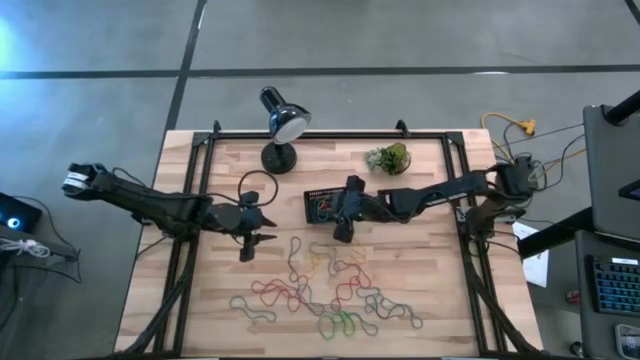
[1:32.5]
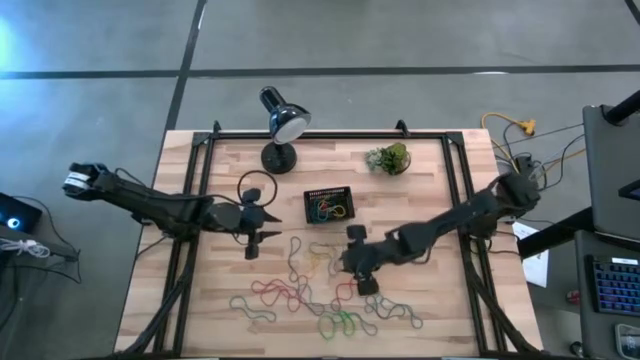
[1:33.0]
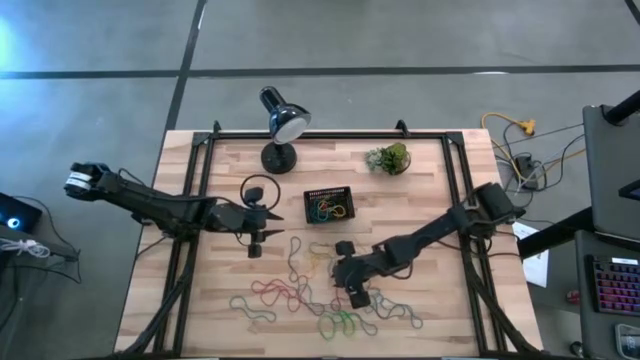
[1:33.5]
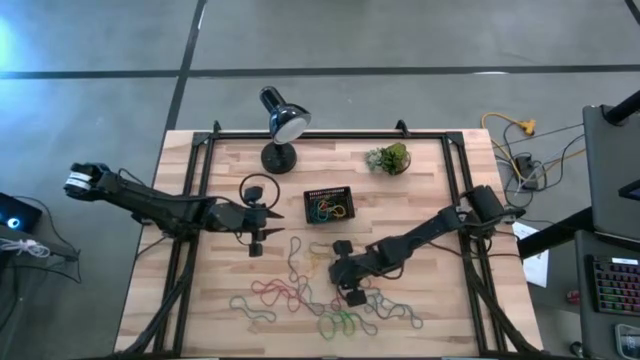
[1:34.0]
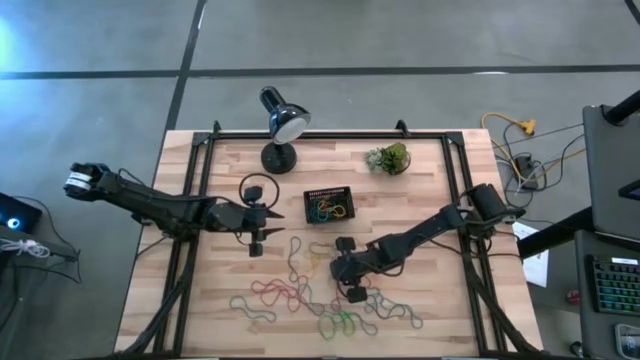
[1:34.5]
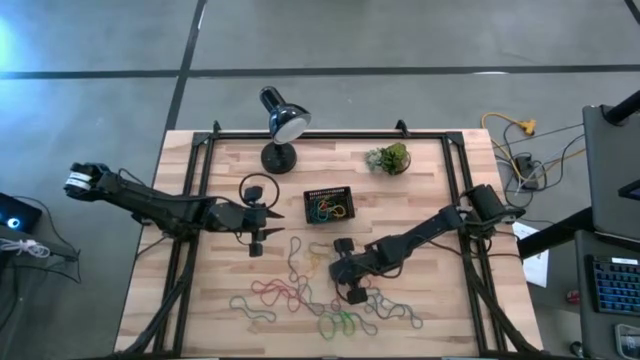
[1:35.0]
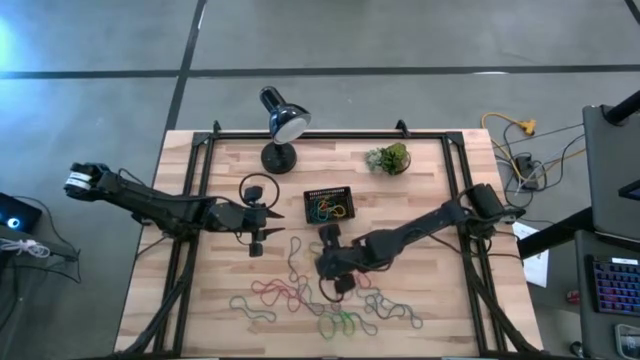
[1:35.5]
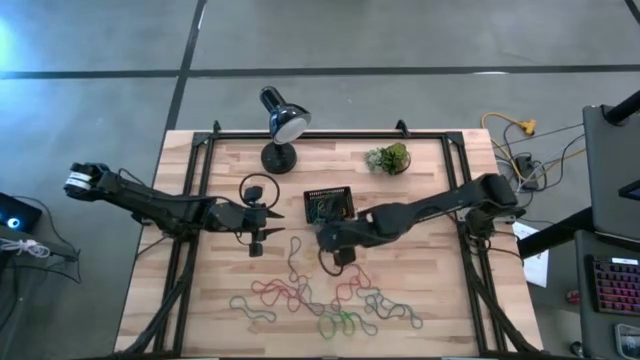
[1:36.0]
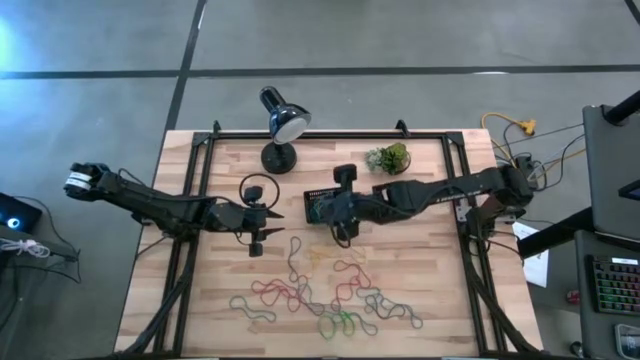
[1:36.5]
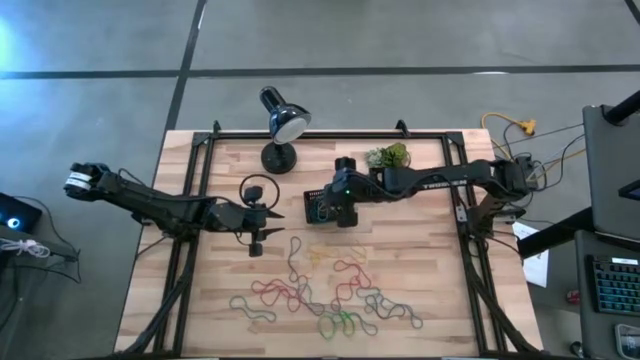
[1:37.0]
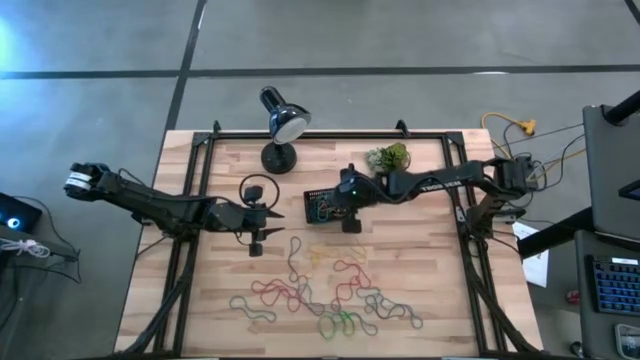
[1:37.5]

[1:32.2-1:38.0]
Task: Pick and place rubber bands into bin
Put the blue rubber band into the black bin

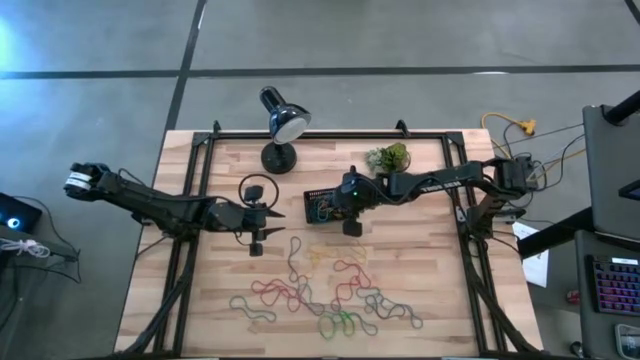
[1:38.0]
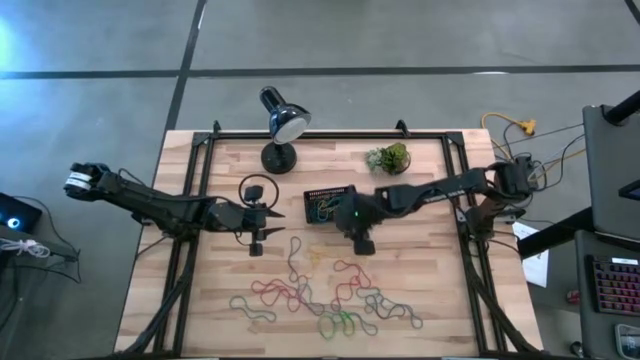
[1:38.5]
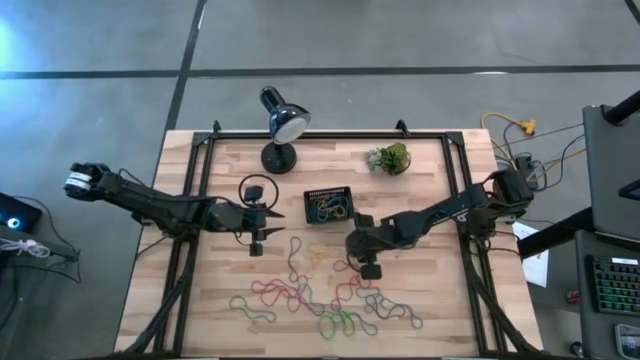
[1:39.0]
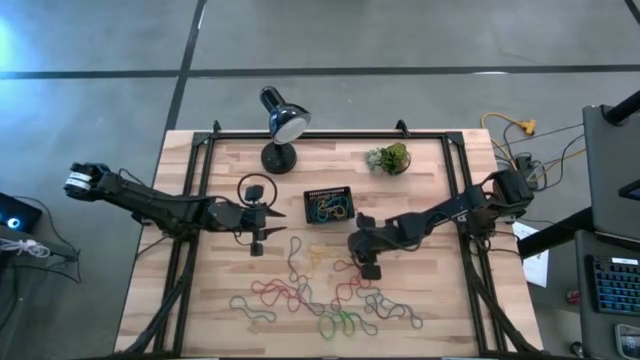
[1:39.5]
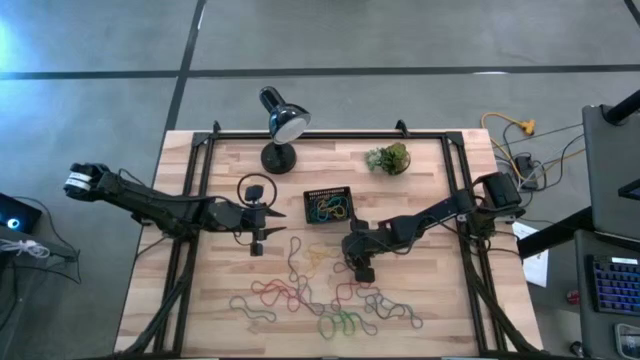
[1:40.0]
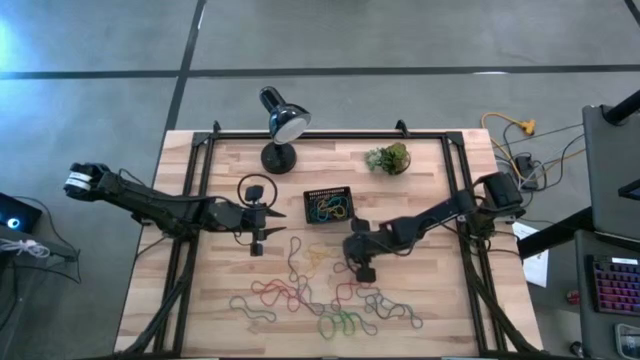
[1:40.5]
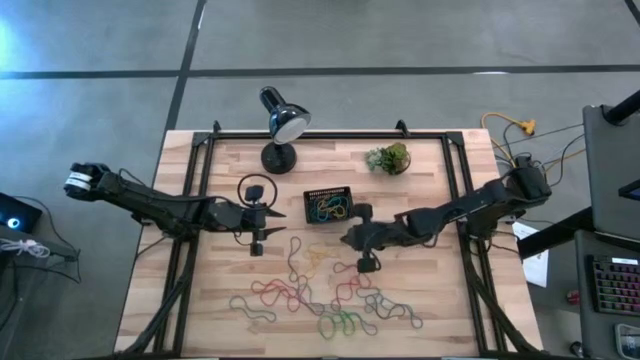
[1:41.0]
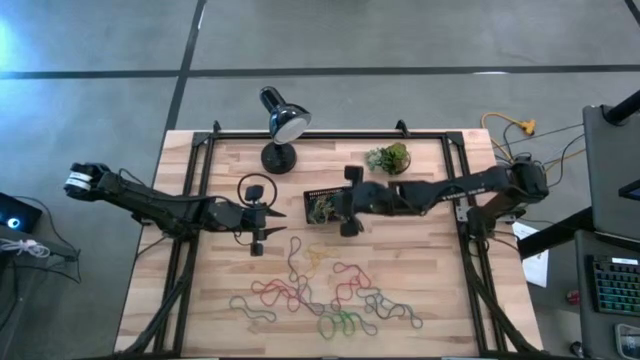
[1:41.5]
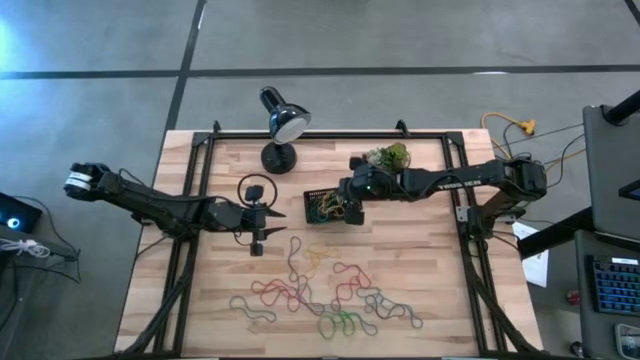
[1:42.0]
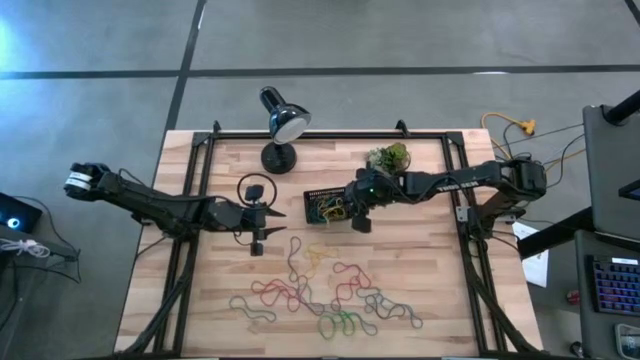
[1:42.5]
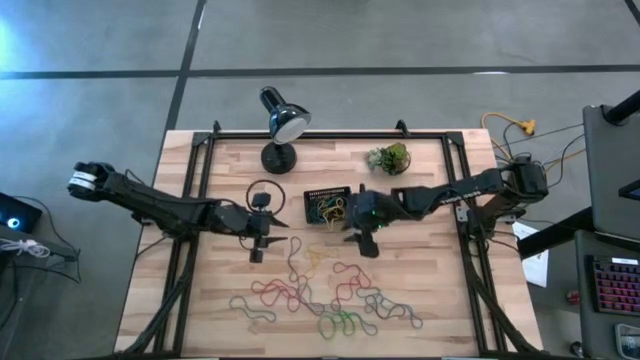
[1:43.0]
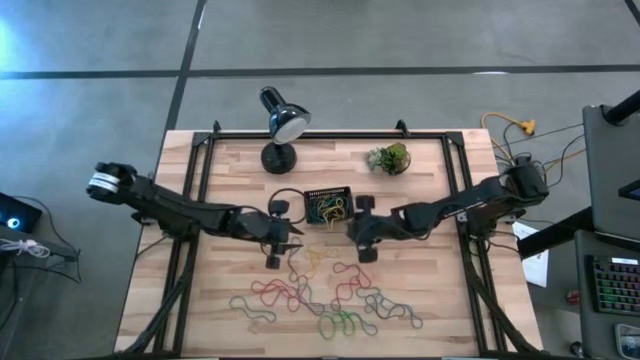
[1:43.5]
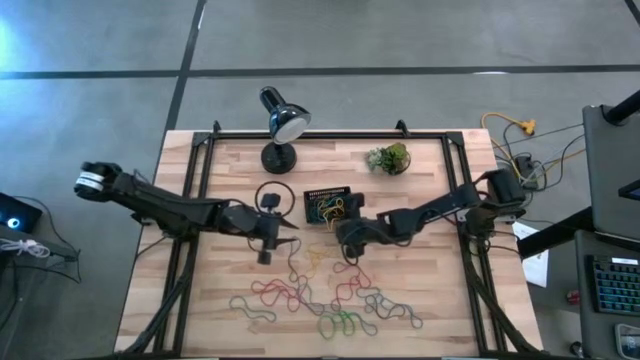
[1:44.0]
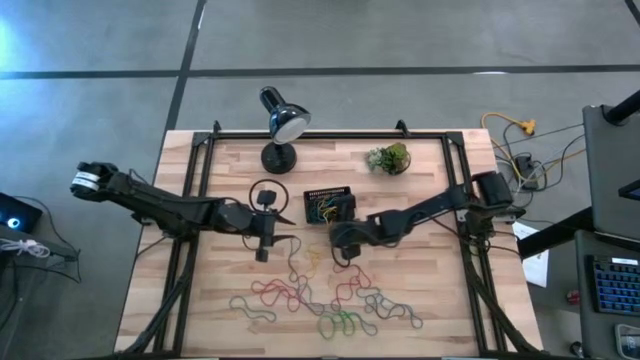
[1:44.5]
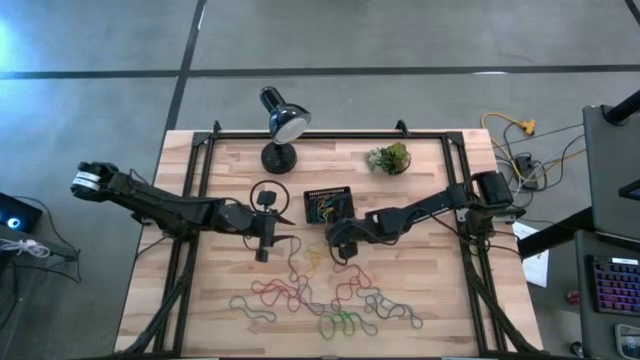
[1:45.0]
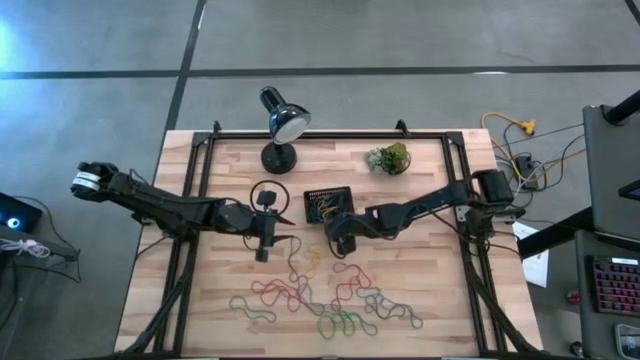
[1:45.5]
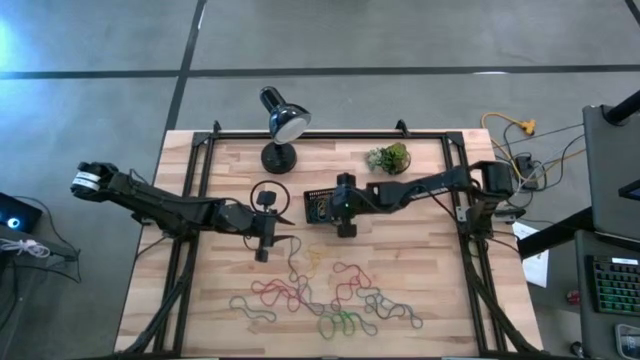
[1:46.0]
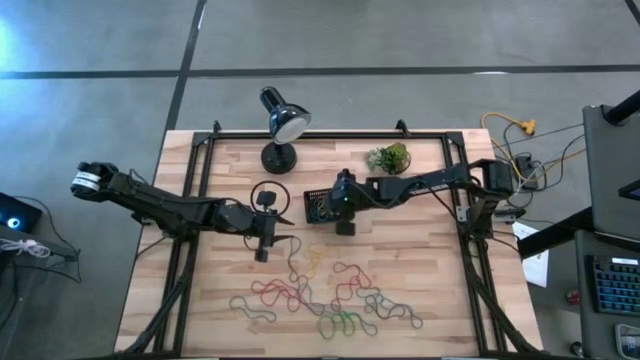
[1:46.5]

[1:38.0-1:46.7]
Put the yellow rubber band into the black bin

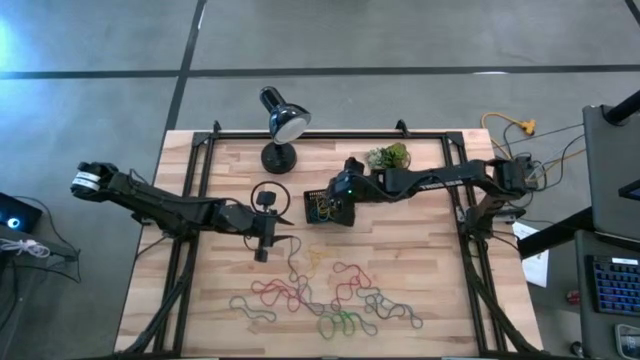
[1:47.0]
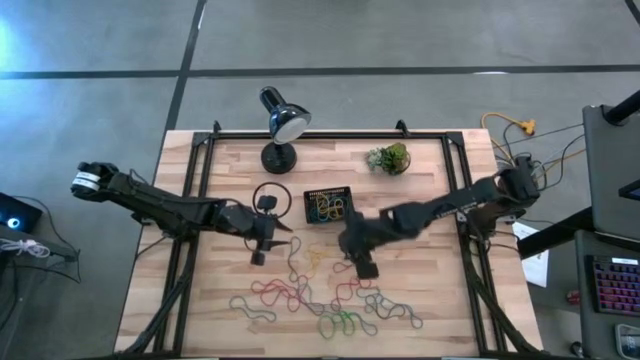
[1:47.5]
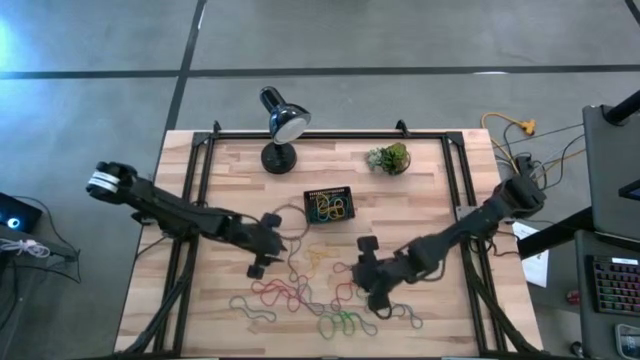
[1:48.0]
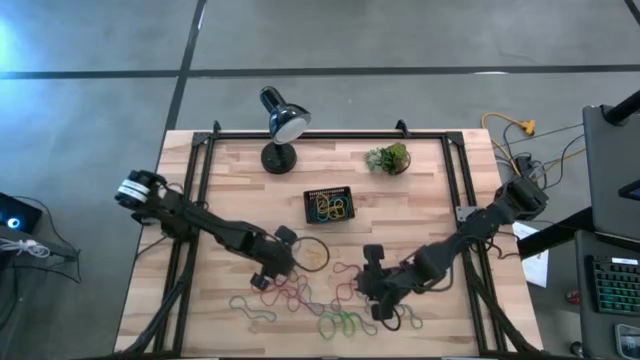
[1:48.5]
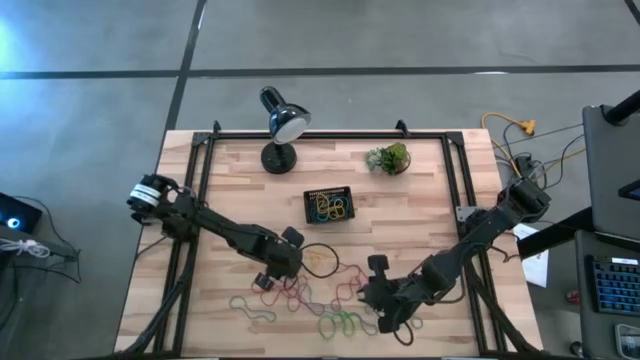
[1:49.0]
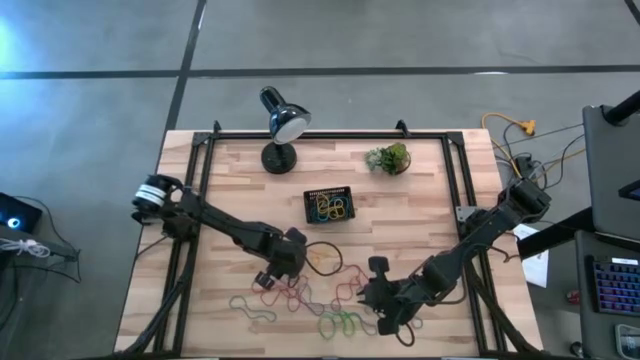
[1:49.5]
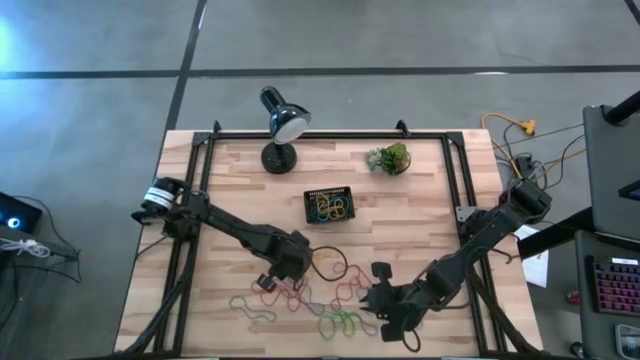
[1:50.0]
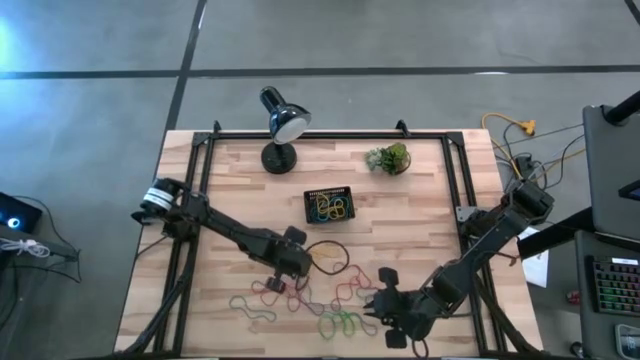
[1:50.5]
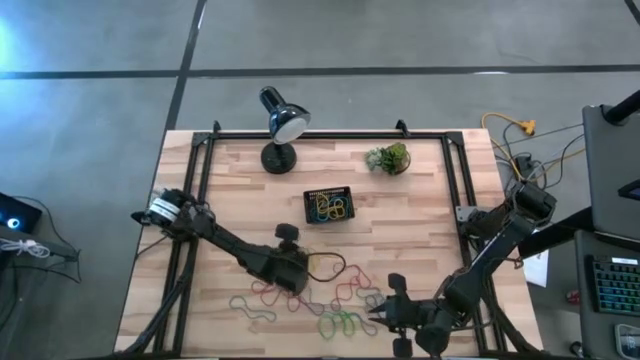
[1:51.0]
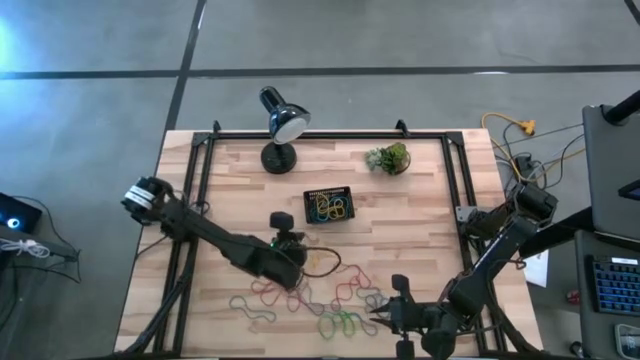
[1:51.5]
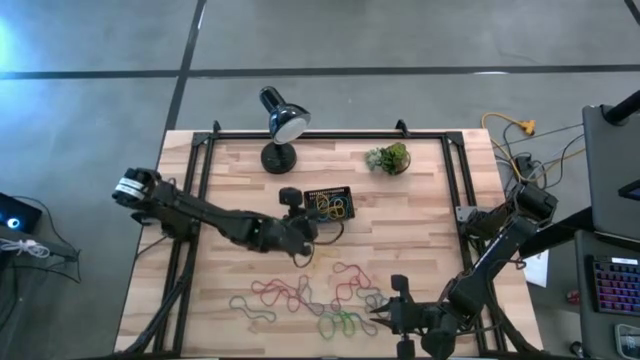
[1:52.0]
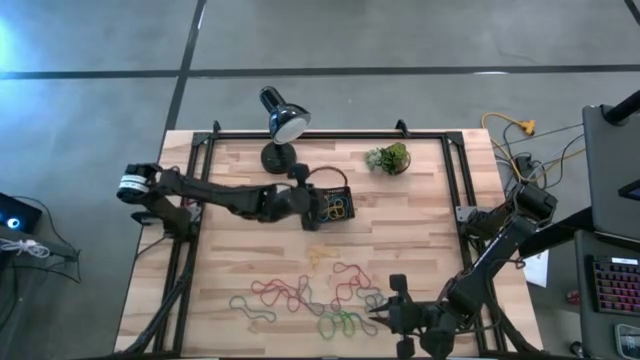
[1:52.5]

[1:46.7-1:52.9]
Put the purple rubber band into the black bin

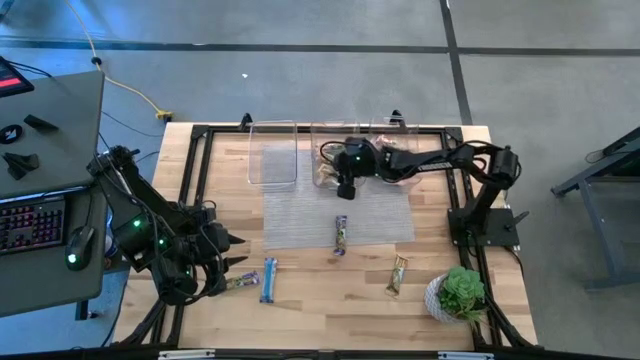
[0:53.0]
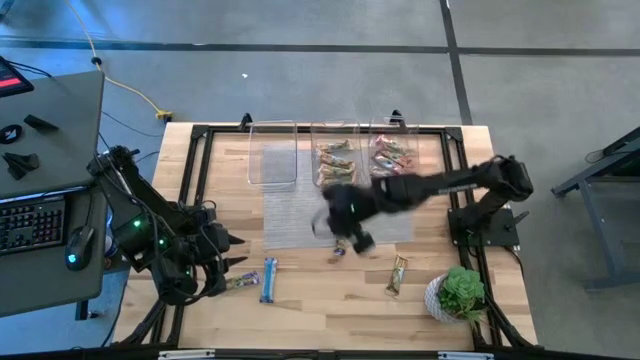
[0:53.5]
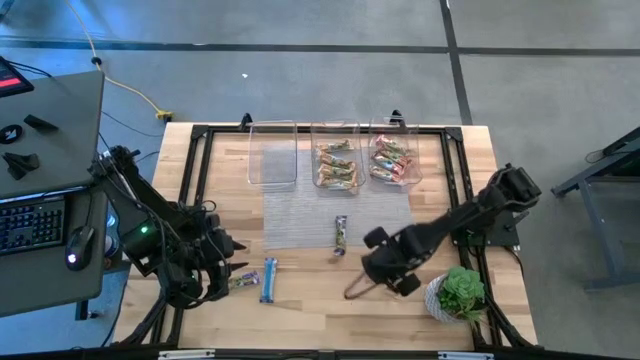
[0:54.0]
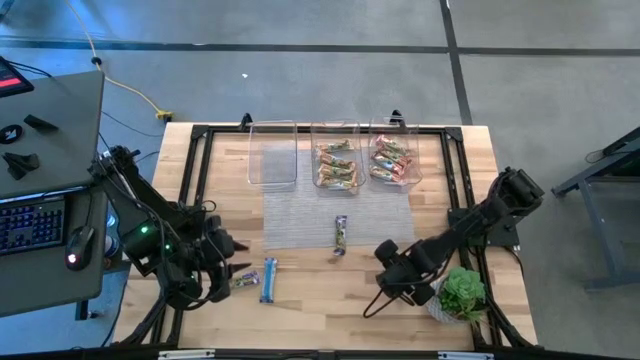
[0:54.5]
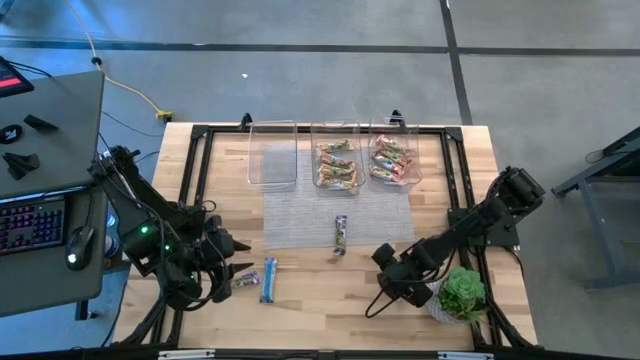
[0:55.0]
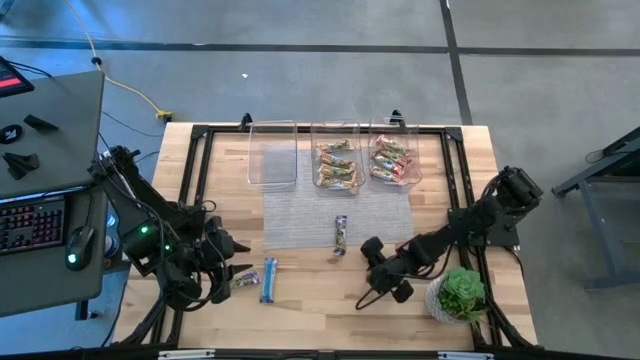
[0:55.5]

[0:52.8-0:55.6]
Task: Pick and place Granola Bars by type
Put the orange granola bar into the middle transparent bin
